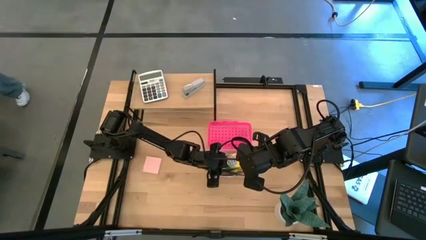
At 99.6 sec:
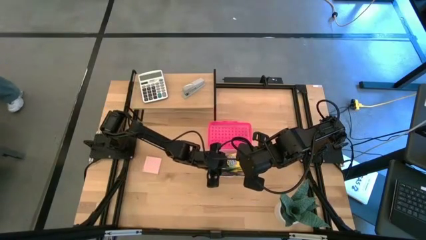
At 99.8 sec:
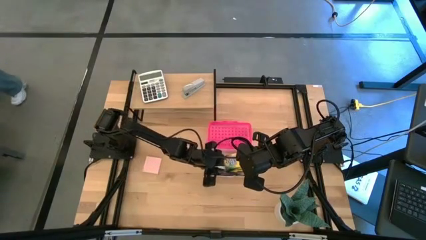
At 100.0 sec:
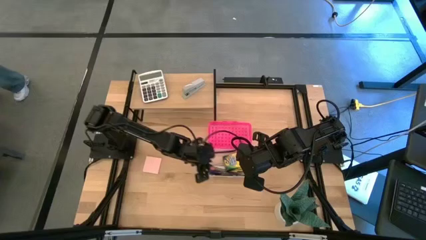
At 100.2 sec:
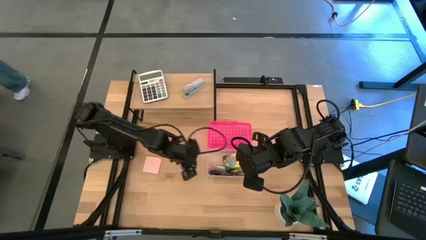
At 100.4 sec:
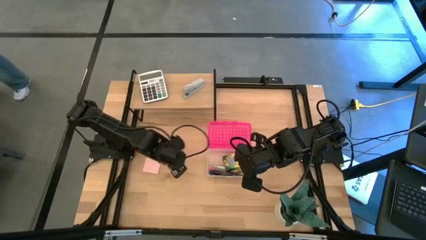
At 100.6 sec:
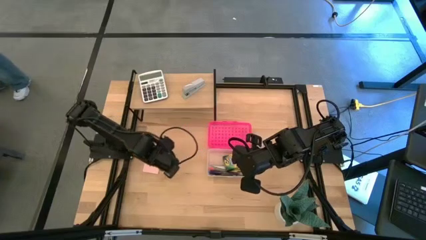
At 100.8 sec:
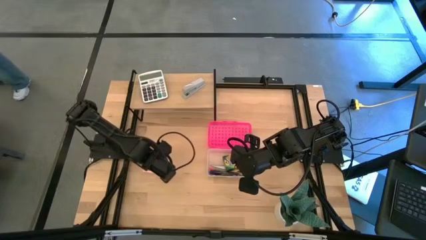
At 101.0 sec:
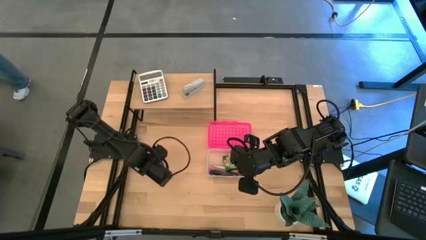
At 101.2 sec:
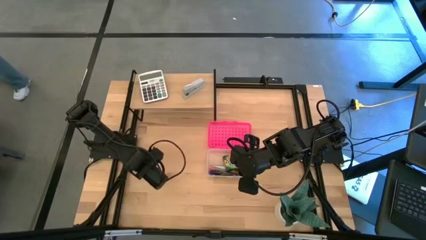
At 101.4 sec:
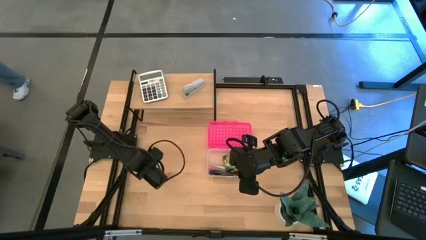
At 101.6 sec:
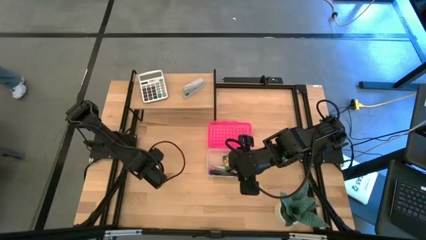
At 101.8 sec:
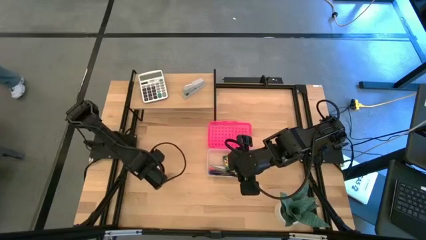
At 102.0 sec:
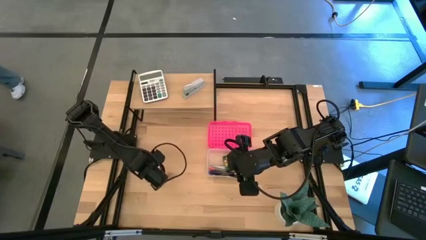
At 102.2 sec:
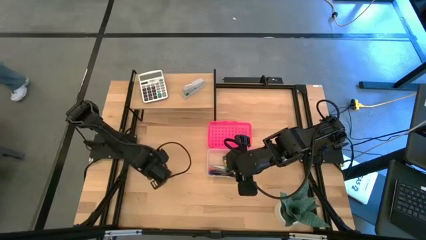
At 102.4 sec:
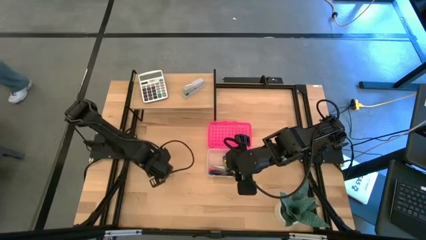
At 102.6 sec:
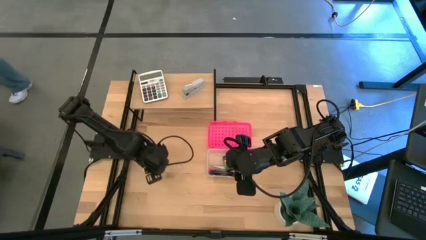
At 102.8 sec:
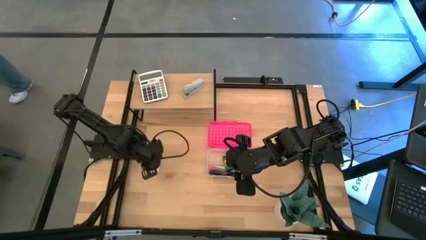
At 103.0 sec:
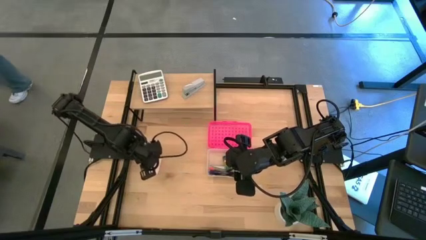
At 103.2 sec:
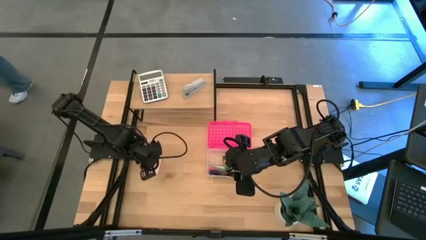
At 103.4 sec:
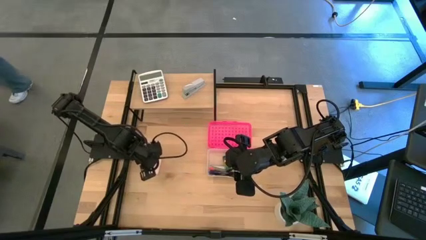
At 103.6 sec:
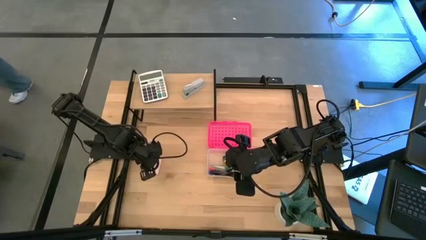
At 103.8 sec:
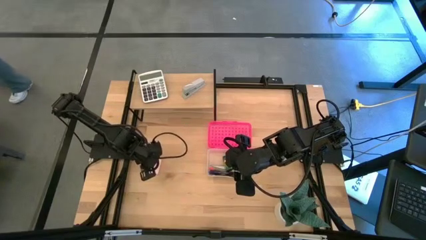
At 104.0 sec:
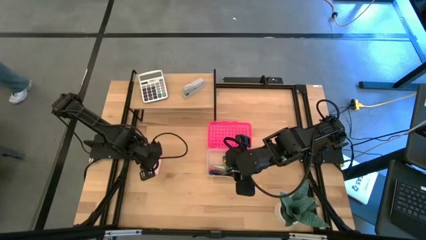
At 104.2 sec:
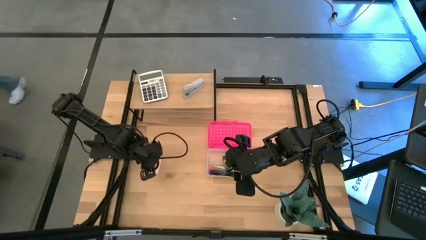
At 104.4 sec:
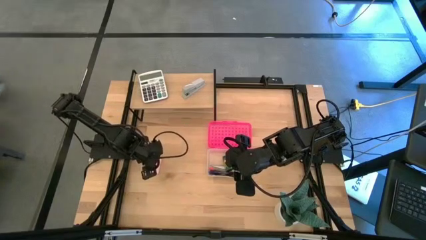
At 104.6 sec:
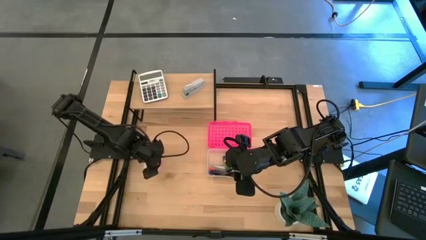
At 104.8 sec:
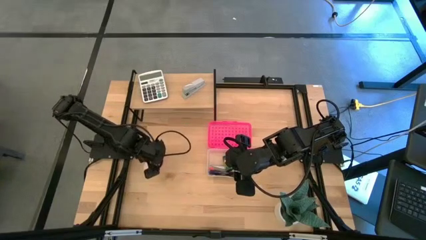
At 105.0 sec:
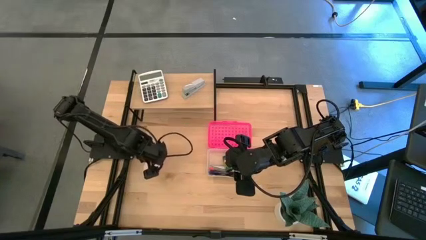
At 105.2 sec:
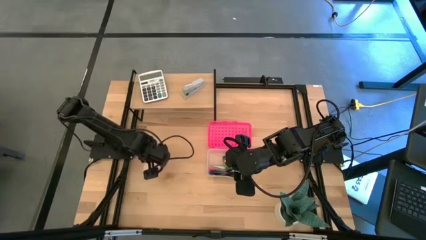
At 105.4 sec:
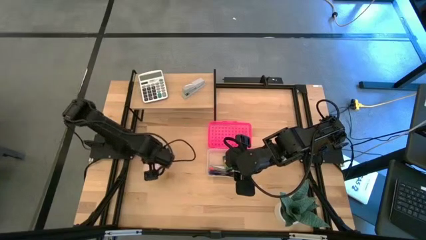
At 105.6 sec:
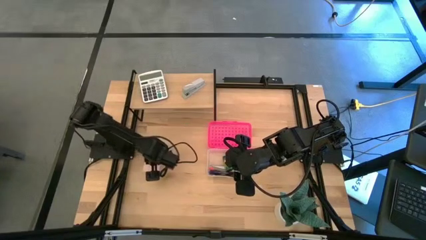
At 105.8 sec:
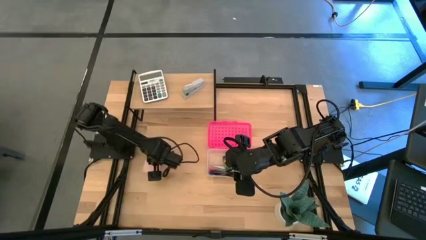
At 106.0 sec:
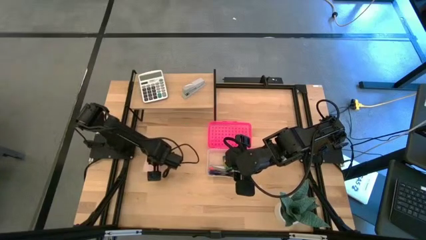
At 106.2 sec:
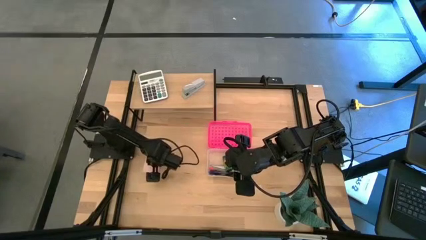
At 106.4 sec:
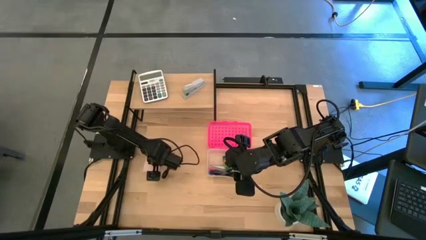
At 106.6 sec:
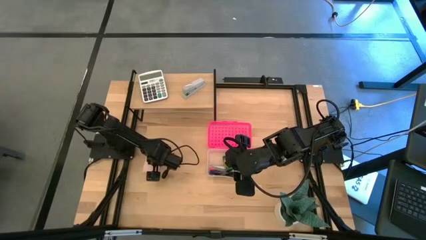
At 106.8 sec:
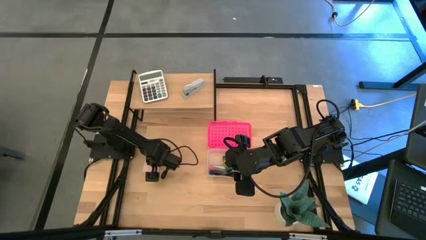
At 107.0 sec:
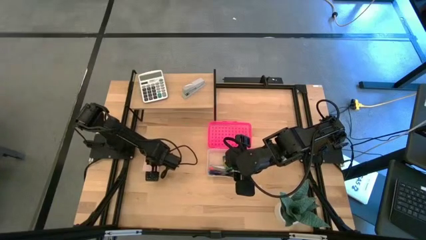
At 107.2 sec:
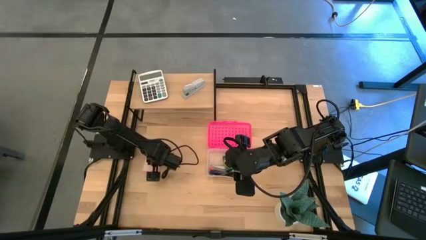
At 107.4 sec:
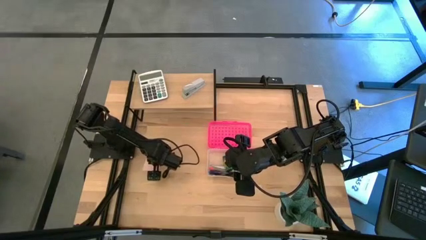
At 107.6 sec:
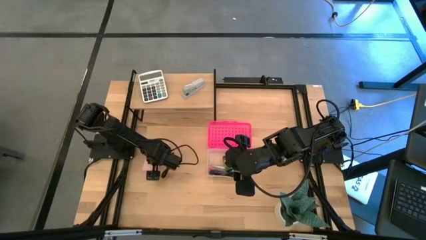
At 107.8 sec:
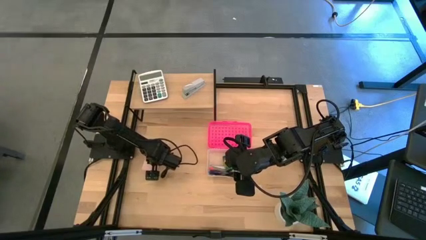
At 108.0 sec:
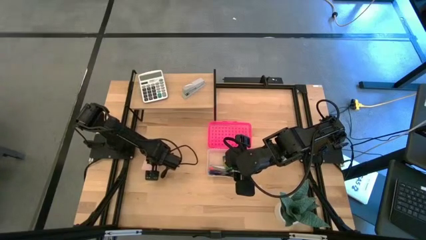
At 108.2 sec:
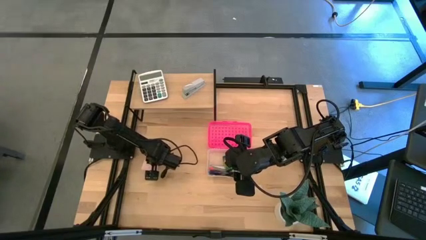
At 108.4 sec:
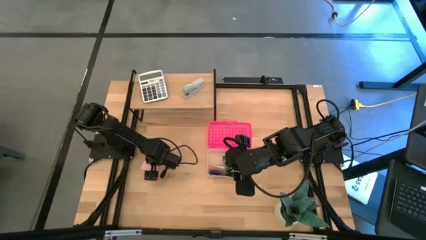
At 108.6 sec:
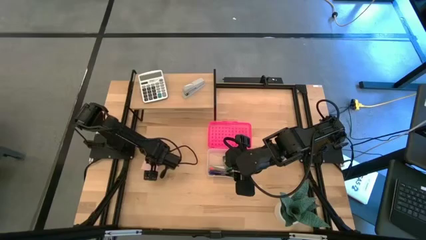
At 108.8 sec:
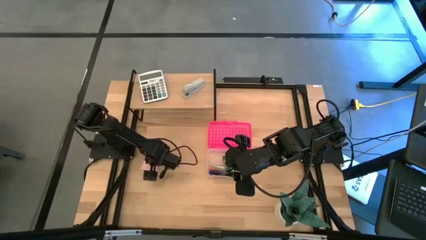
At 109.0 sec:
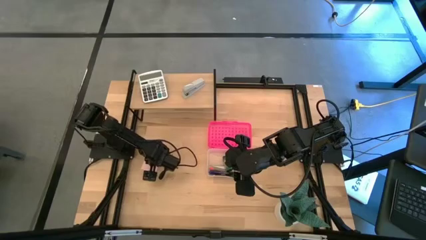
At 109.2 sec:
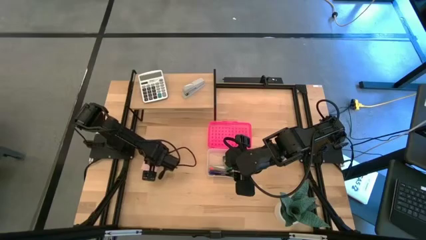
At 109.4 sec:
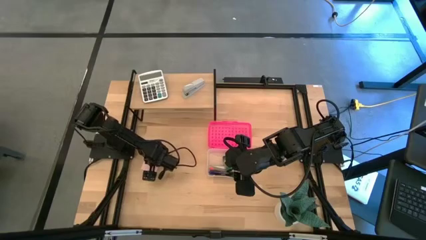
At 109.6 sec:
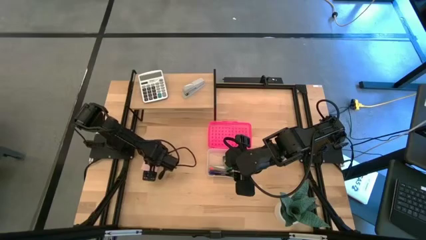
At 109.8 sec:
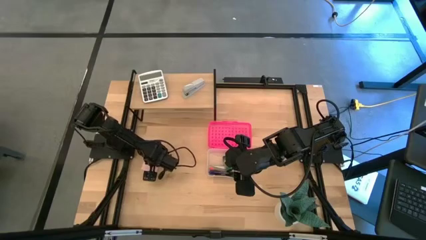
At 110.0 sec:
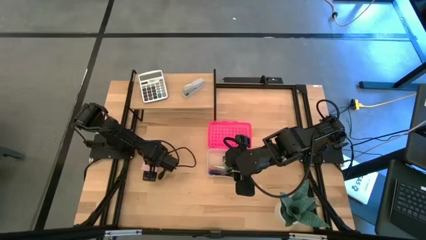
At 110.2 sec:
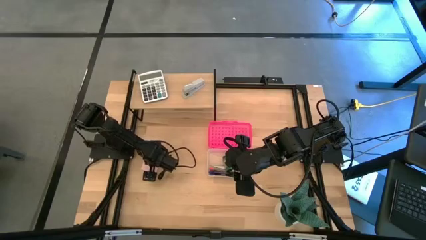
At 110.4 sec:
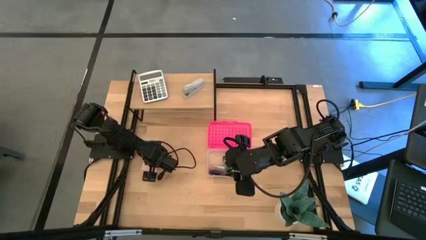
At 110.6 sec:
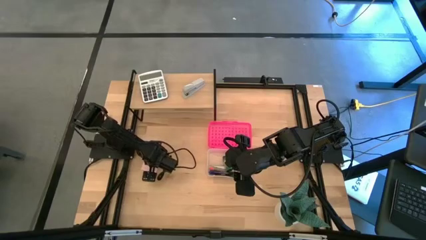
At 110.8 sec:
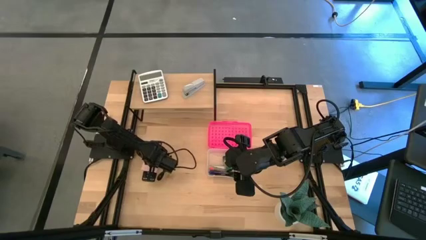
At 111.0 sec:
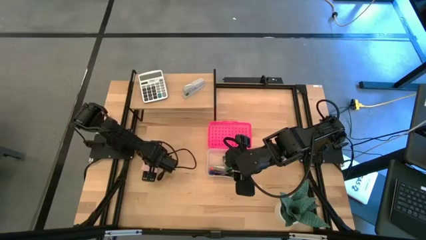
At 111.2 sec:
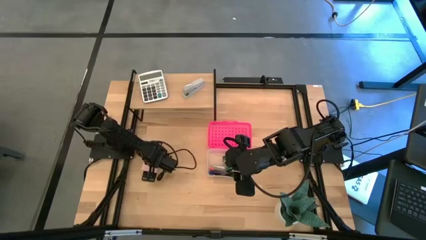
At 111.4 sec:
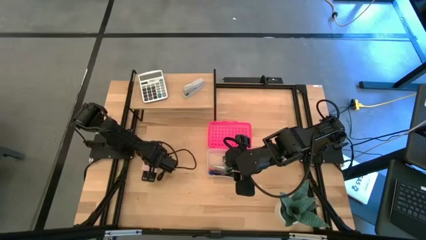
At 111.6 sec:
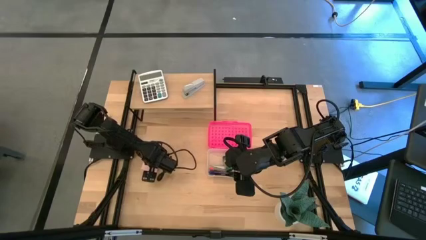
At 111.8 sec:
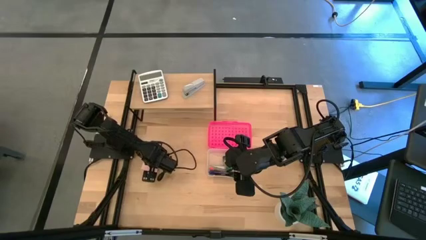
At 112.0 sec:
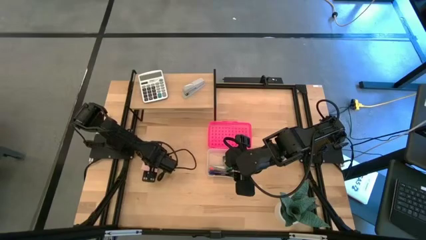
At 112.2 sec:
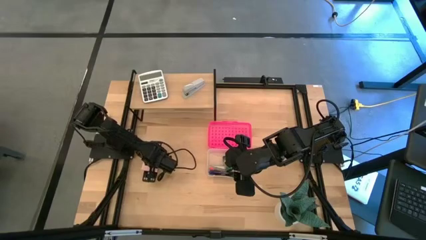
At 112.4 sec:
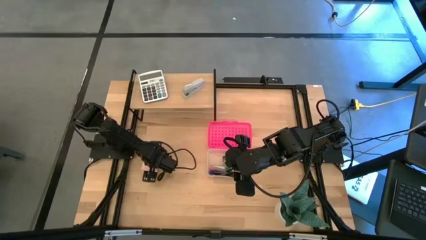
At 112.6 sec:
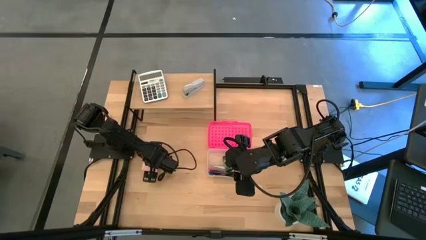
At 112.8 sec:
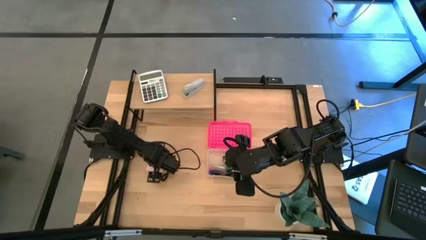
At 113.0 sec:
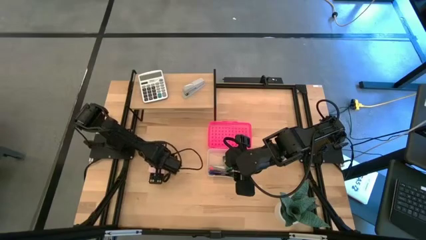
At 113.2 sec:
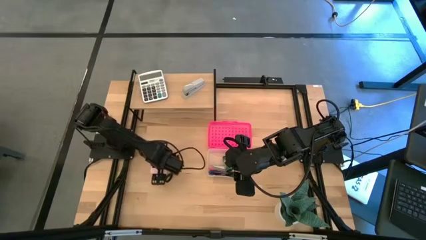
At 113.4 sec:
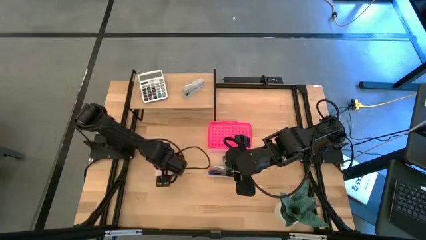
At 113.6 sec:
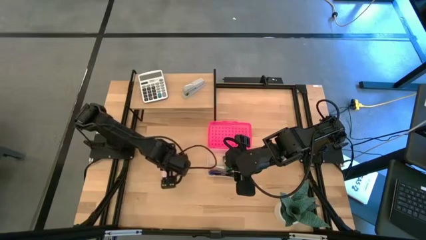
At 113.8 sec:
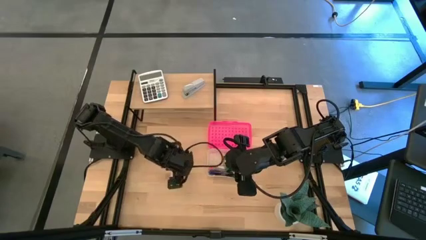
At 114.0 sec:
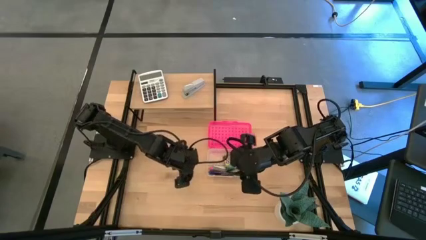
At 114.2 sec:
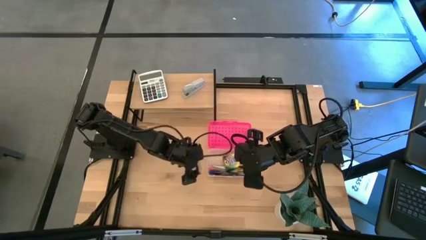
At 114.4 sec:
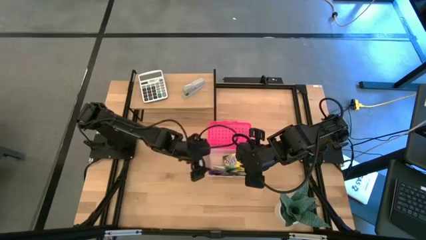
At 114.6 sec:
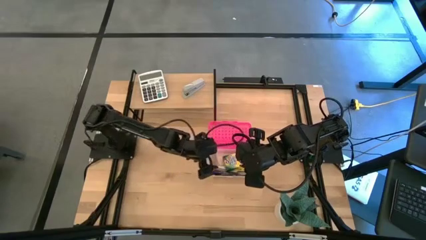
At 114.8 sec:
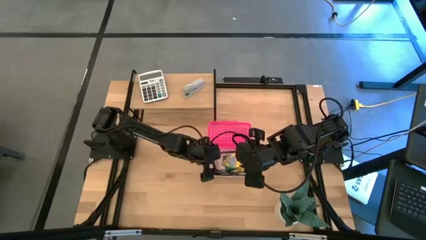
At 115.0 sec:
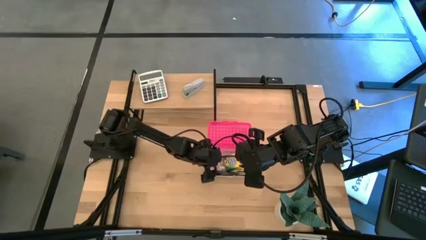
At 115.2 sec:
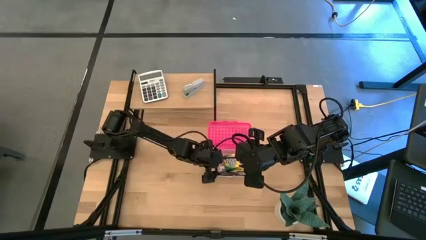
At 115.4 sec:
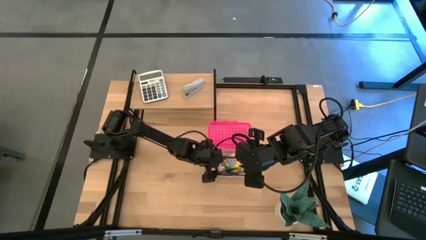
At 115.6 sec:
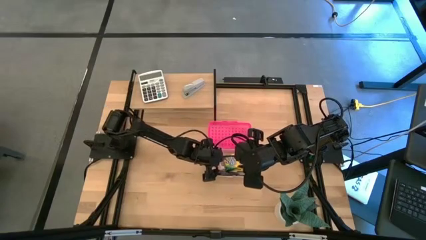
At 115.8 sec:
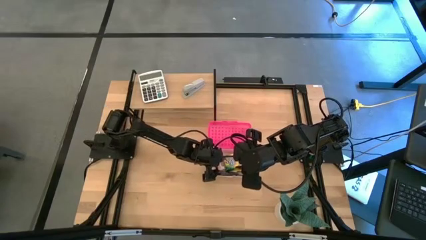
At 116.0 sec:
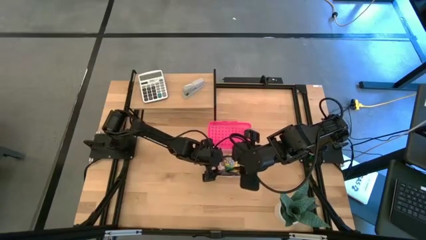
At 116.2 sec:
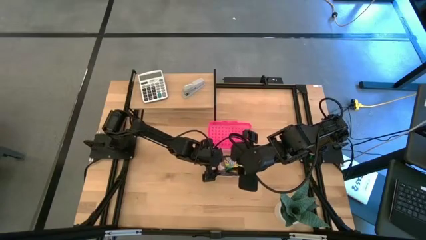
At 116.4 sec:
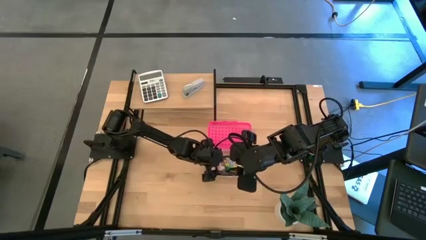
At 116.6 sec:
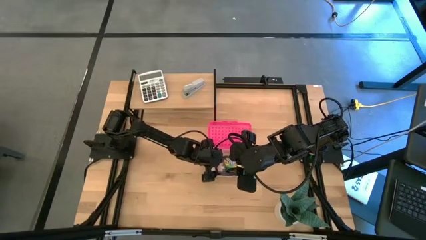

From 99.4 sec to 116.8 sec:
Task: Pack school essentials
Put the sticky notes into the pink supply box
